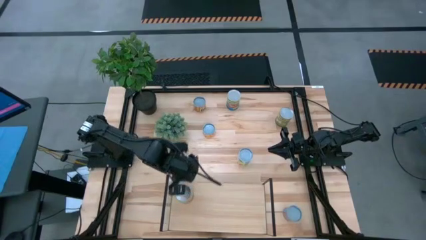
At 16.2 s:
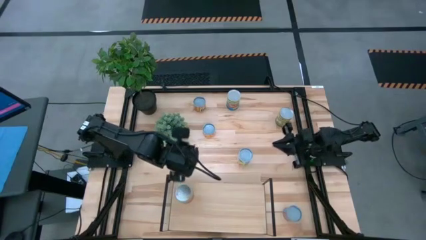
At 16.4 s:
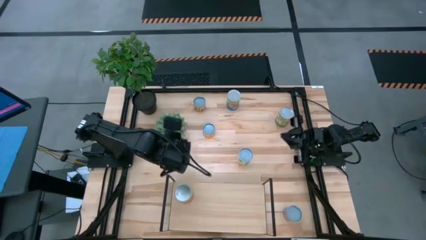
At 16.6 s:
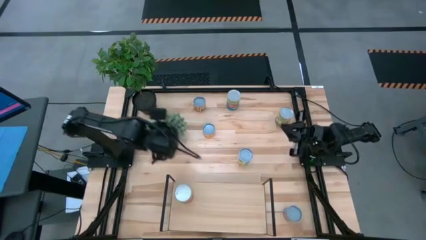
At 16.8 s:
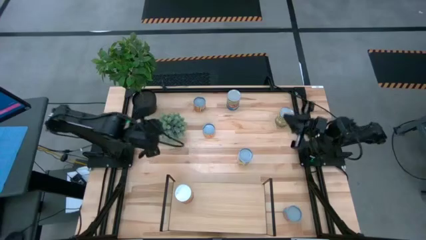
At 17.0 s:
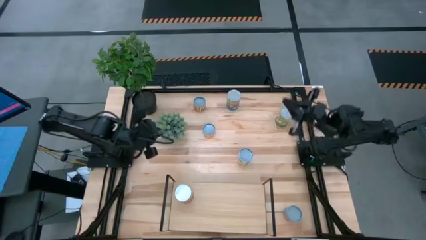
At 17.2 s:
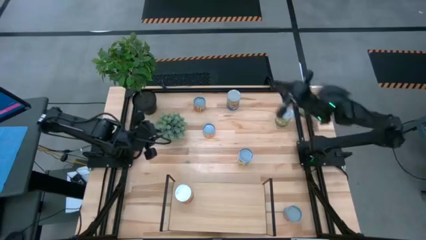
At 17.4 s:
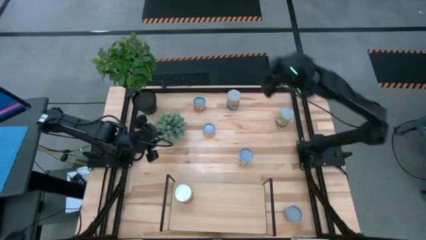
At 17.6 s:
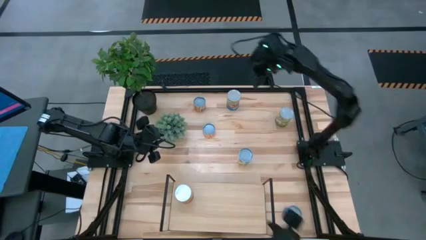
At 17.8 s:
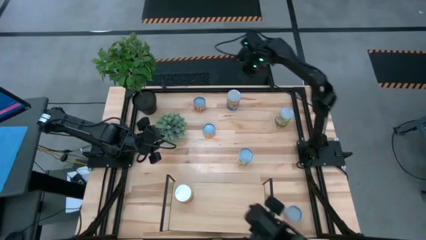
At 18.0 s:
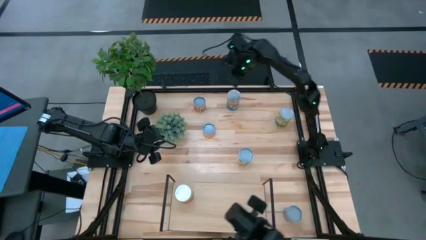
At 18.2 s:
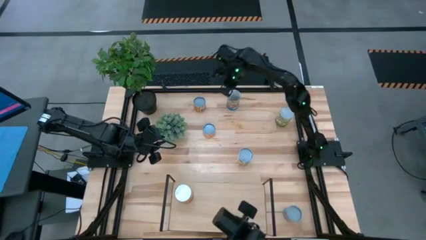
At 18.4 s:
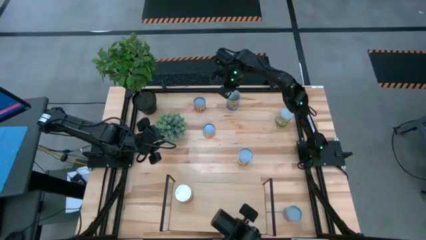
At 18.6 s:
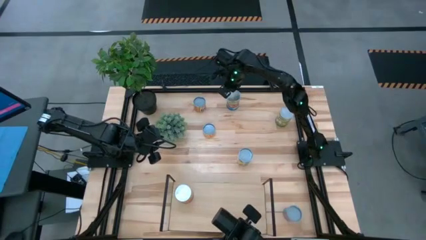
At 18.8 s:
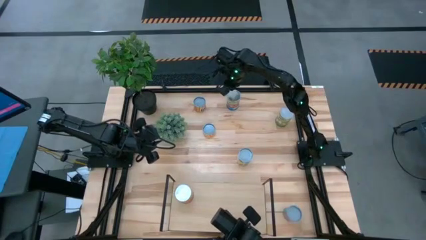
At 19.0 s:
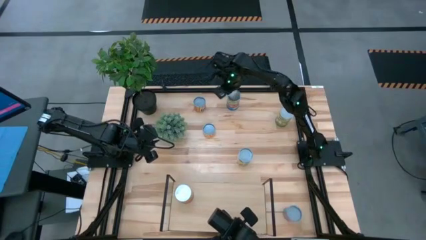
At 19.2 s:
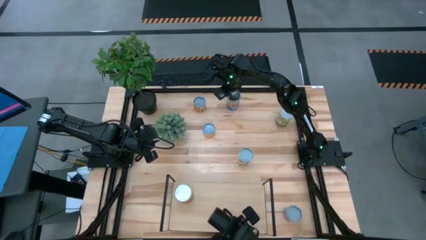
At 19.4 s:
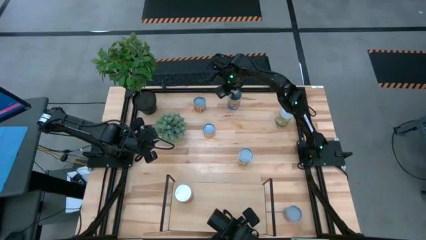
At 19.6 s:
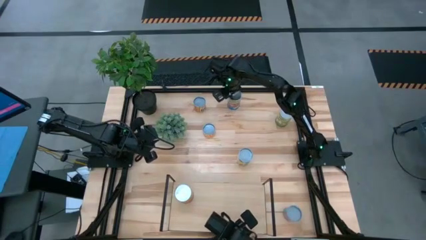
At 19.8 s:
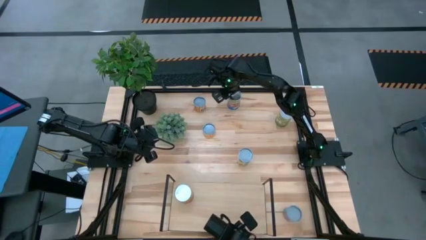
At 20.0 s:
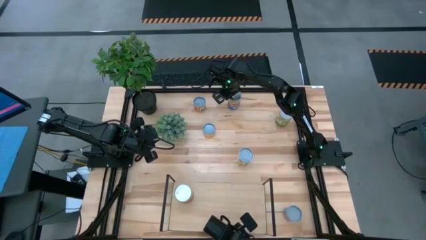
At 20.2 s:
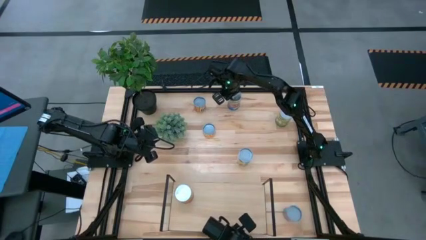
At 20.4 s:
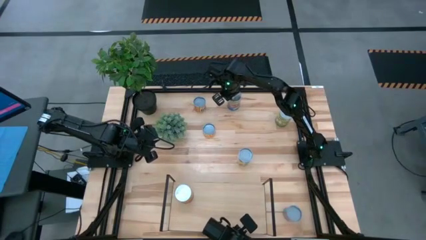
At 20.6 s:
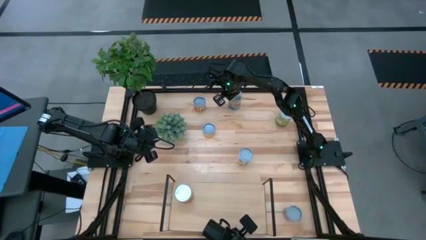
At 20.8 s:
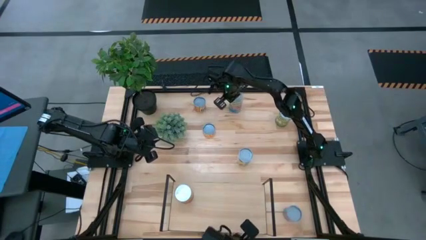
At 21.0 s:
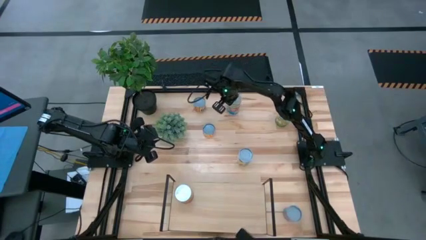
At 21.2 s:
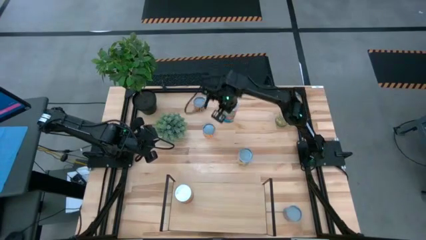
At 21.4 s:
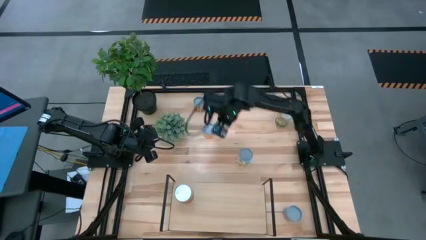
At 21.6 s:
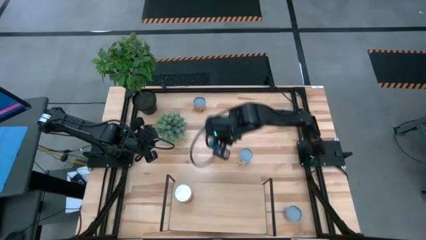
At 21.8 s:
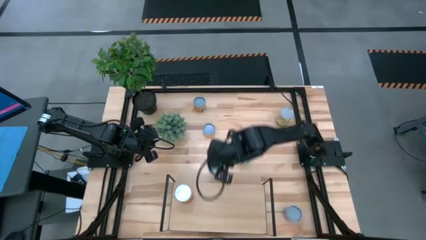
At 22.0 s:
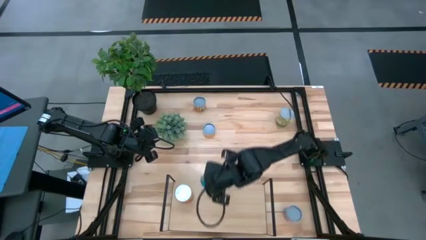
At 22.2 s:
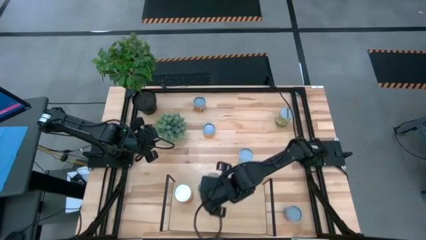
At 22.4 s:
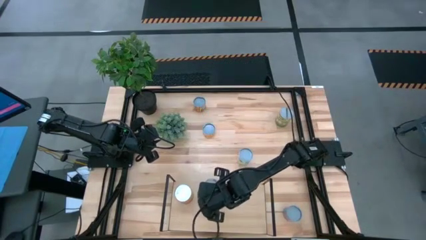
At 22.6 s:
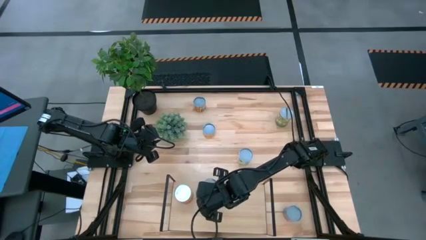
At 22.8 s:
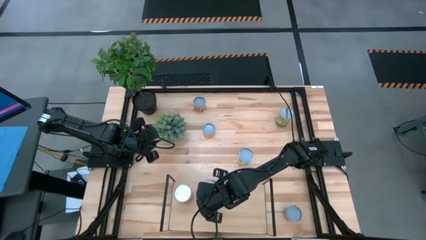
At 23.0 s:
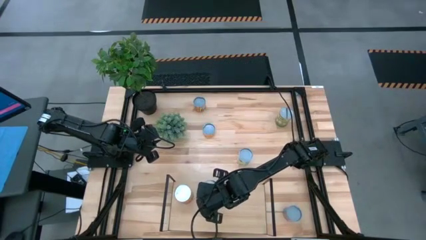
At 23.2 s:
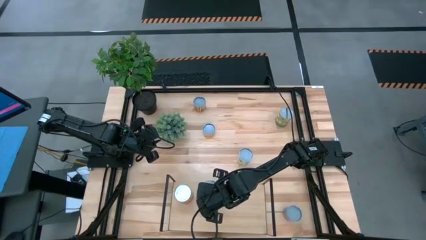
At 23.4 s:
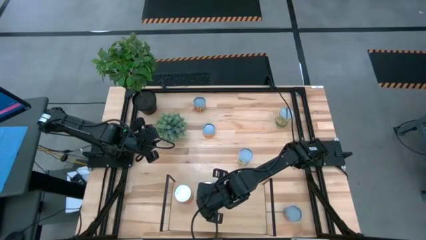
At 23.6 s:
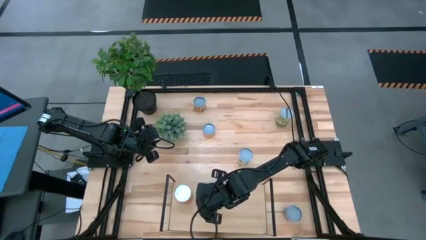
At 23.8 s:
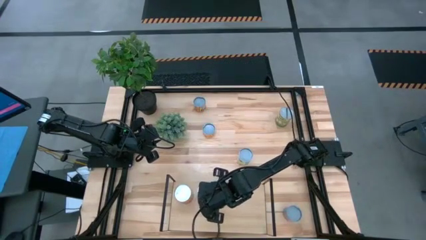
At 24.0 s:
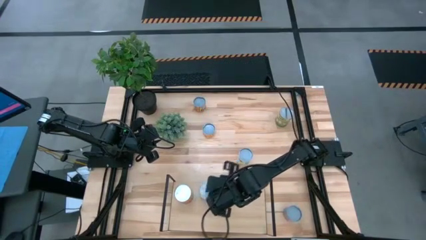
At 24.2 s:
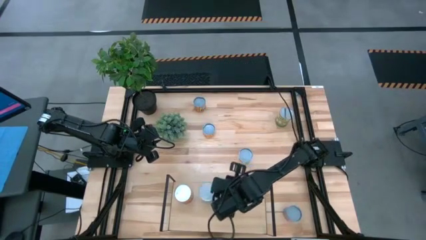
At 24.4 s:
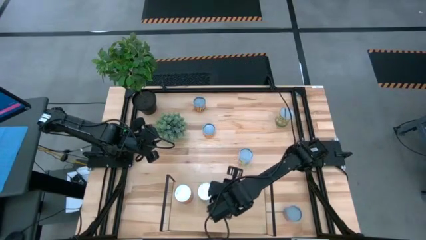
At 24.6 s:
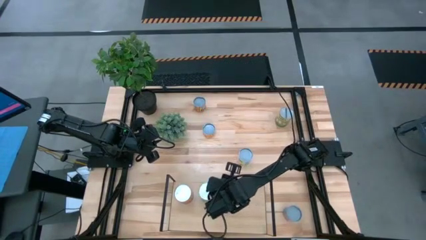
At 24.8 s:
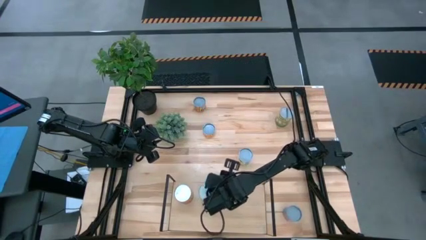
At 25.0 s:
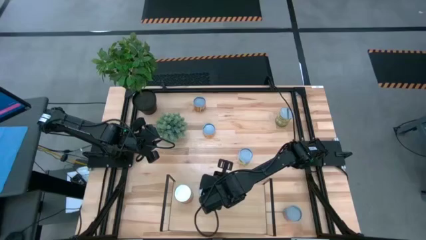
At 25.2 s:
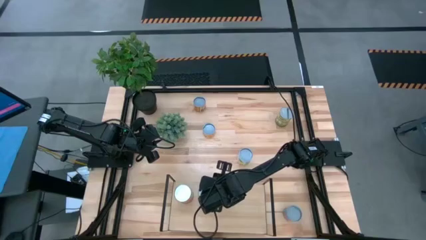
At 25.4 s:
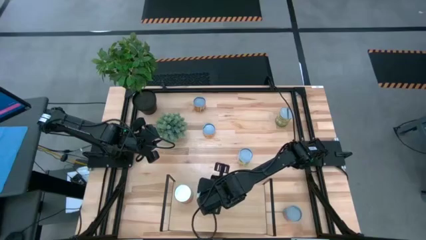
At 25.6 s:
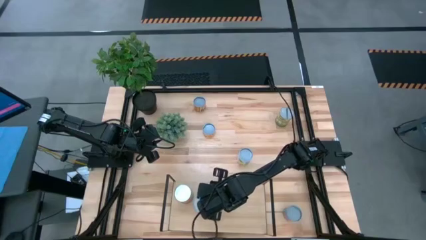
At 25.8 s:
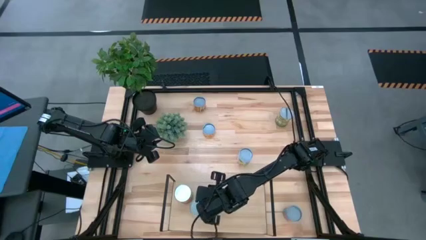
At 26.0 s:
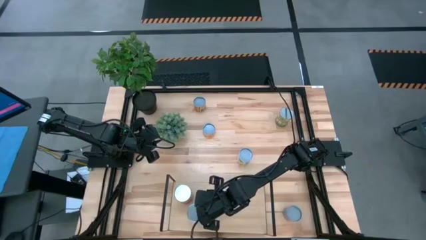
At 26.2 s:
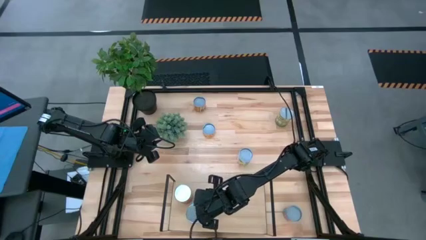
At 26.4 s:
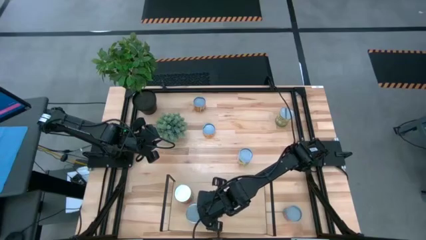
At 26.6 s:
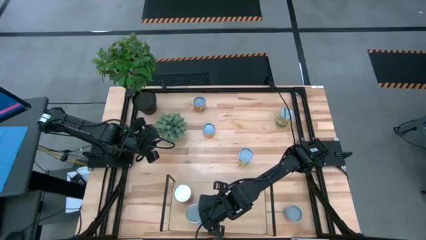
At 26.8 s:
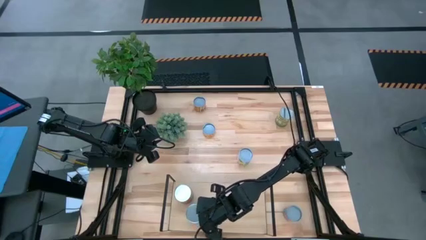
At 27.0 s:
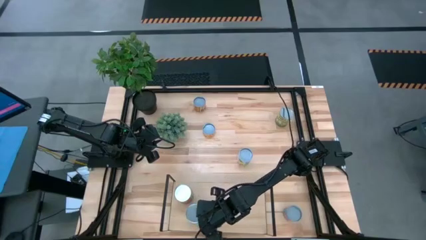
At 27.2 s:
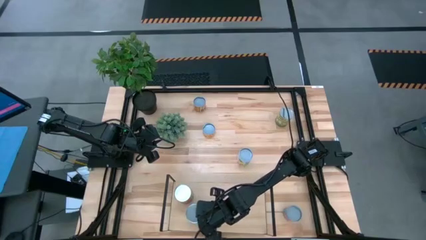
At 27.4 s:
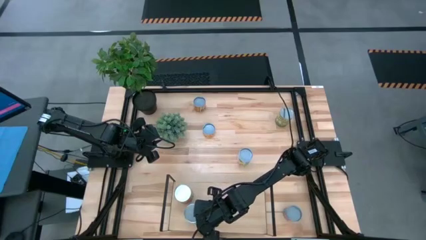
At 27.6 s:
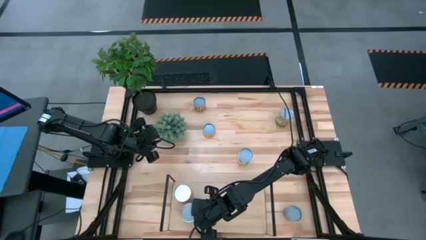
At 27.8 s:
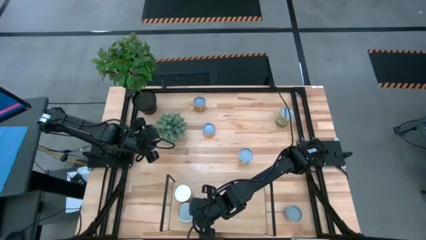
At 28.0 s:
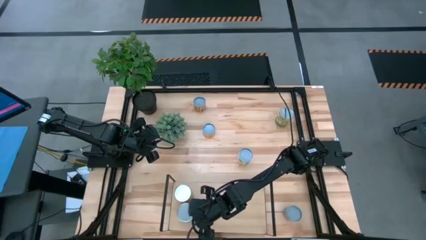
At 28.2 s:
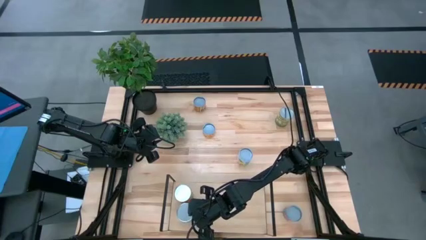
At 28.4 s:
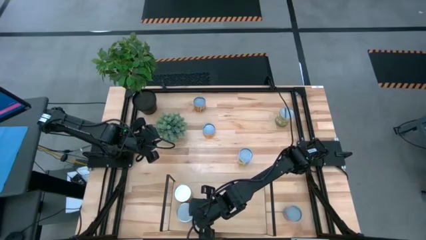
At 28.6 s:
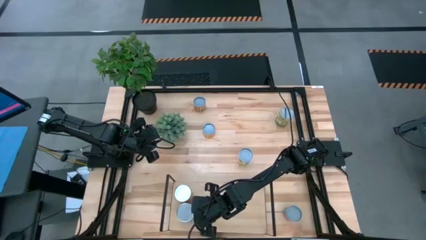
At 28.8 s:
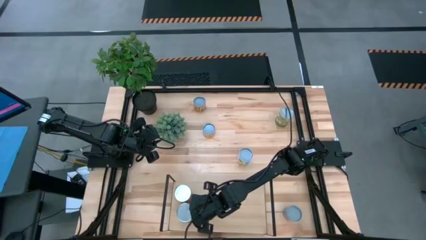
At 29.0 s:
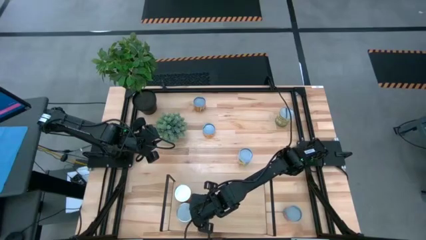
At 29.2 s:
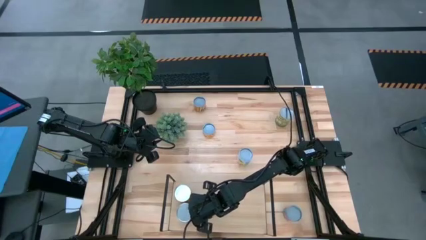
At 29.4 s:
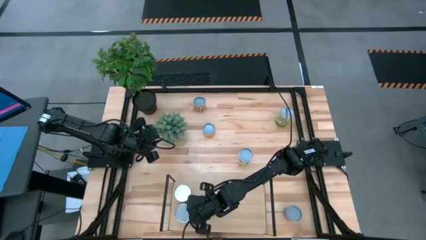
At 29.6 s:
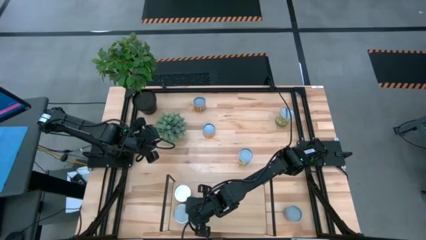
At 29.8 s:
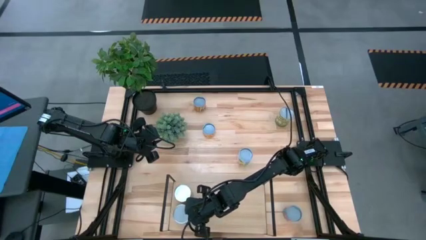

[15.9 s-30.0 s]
Task: Pick and place cans onto a shelf
Put the canned tomatoes on the shelf
